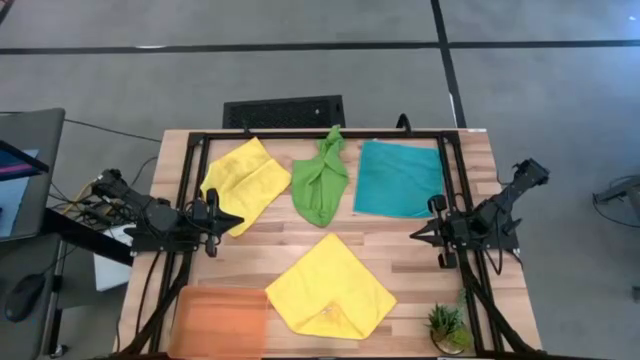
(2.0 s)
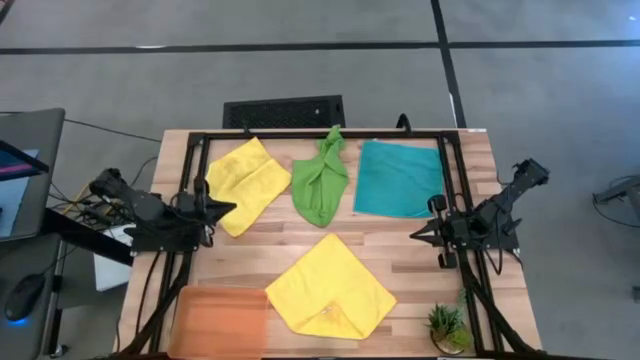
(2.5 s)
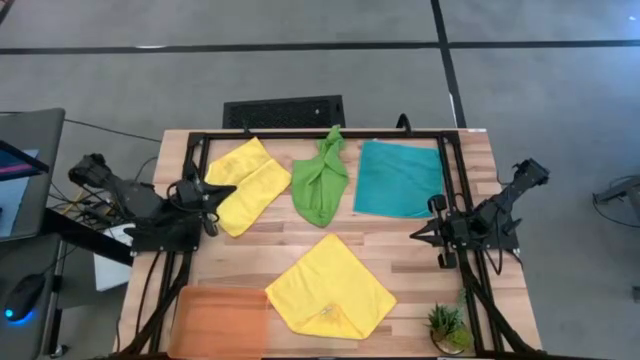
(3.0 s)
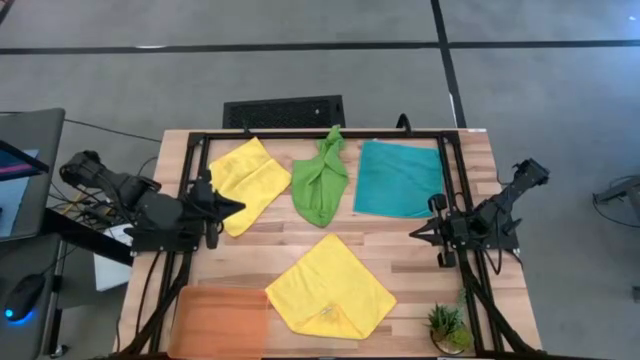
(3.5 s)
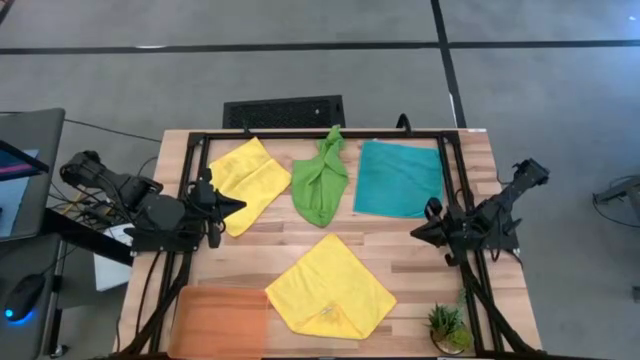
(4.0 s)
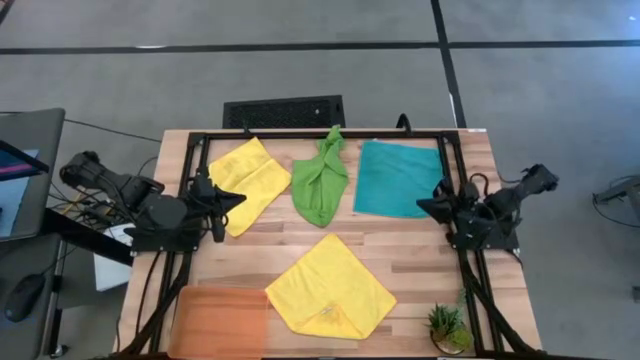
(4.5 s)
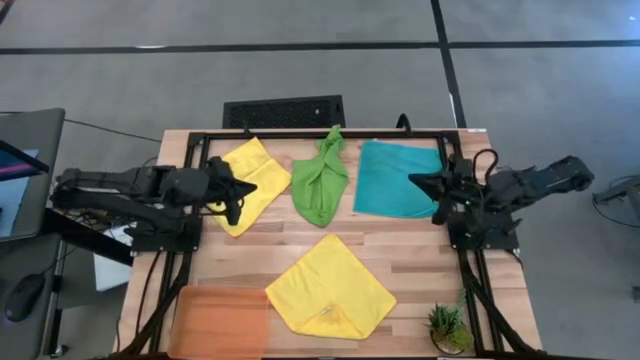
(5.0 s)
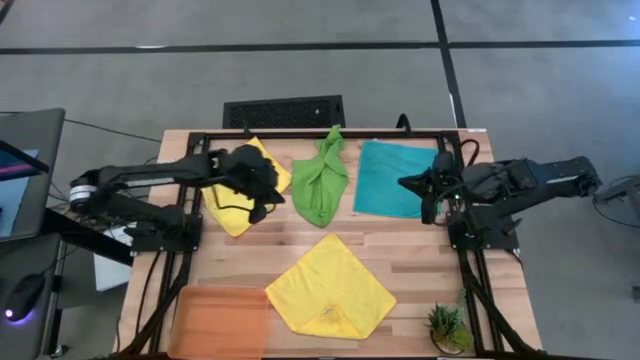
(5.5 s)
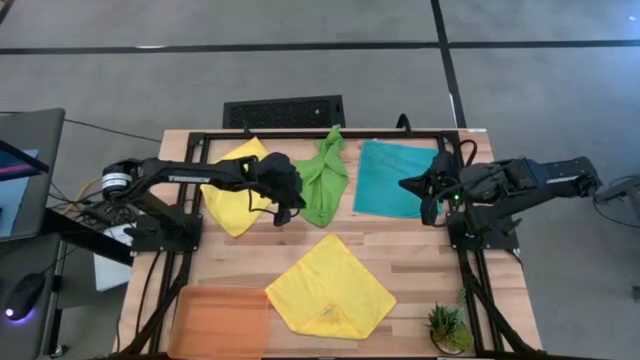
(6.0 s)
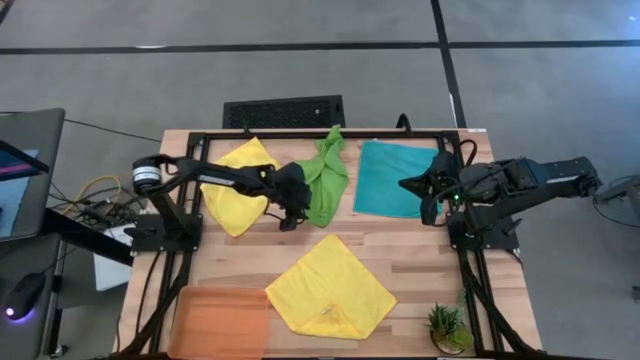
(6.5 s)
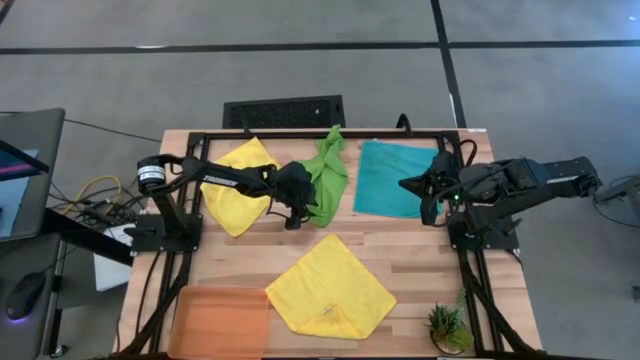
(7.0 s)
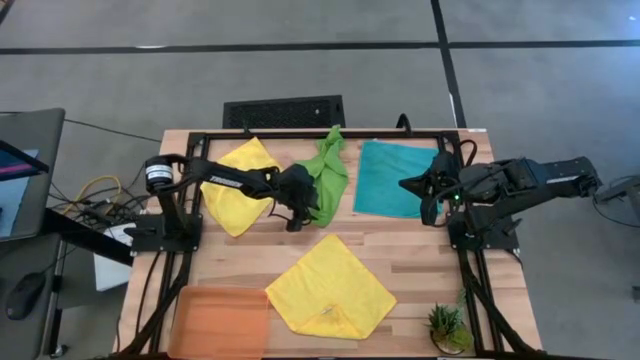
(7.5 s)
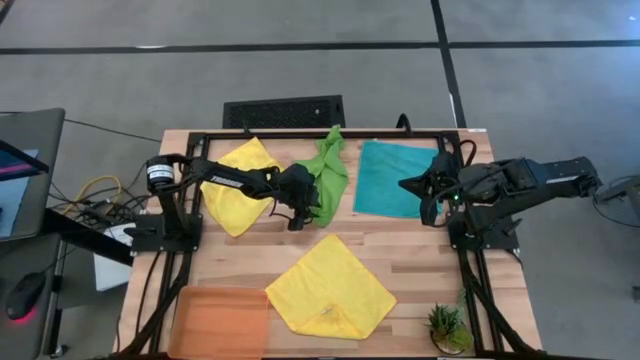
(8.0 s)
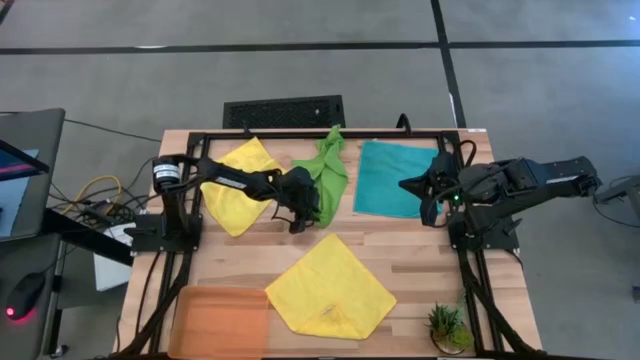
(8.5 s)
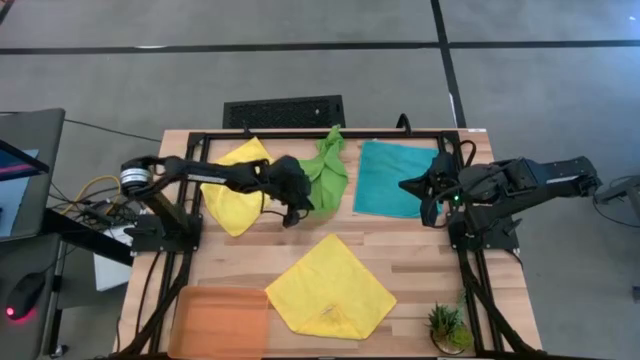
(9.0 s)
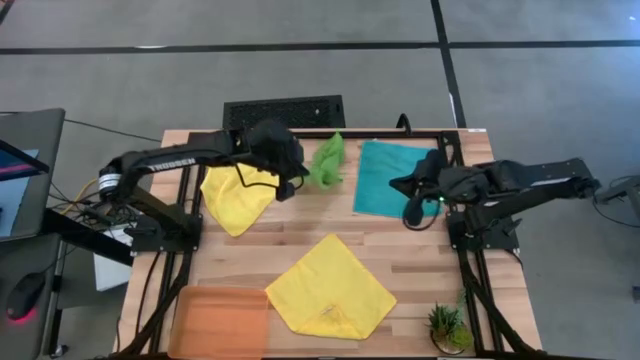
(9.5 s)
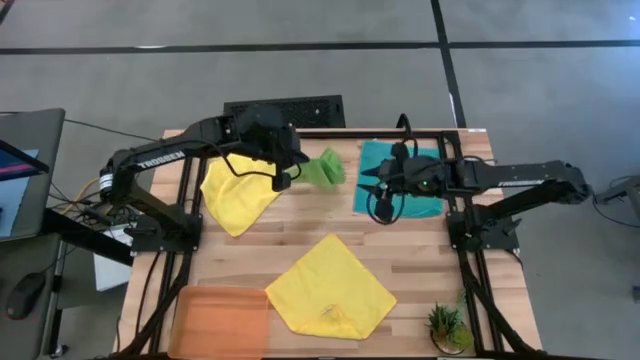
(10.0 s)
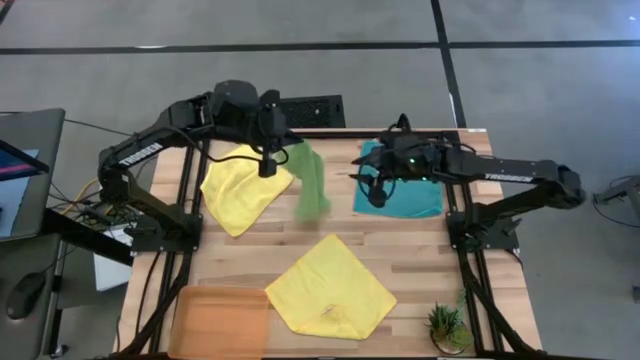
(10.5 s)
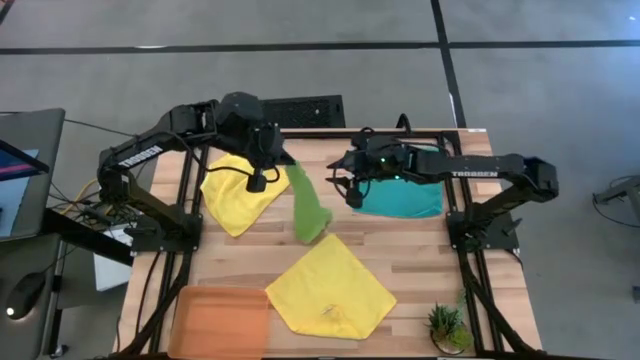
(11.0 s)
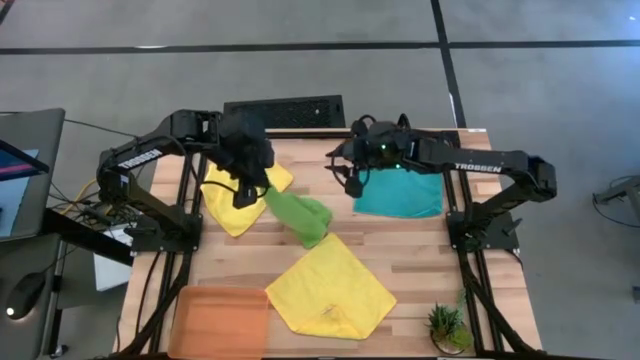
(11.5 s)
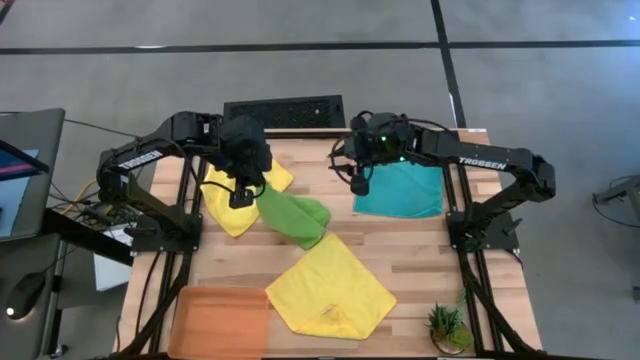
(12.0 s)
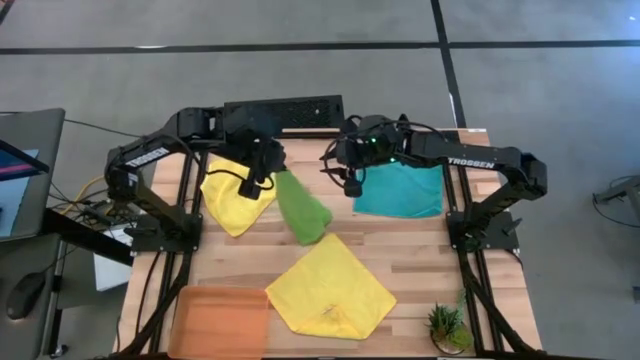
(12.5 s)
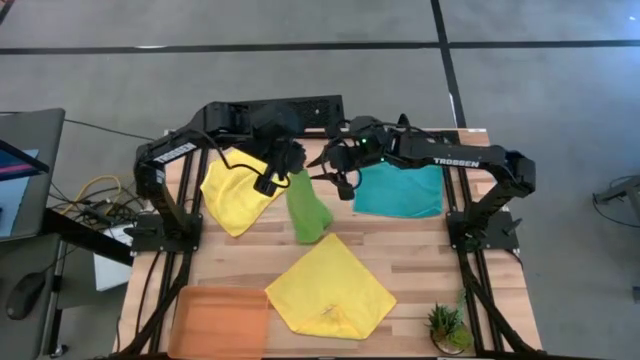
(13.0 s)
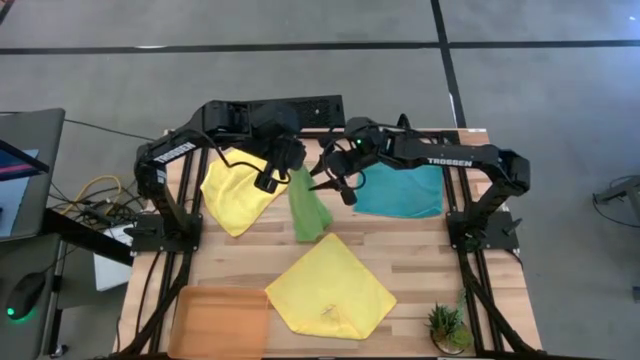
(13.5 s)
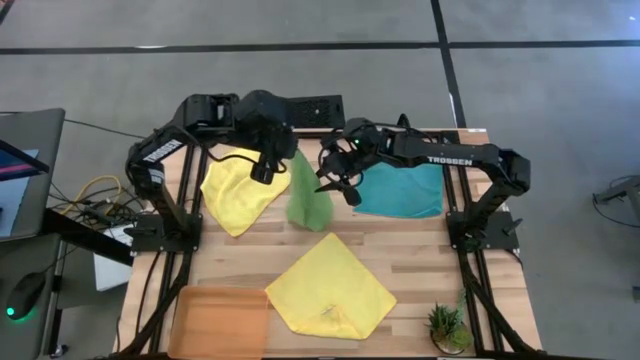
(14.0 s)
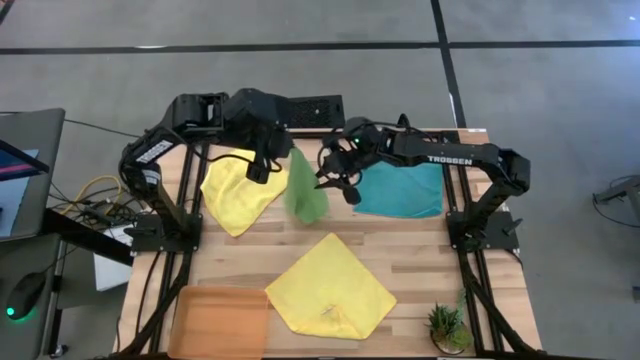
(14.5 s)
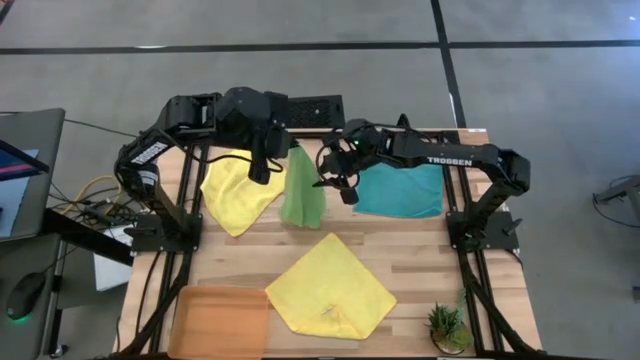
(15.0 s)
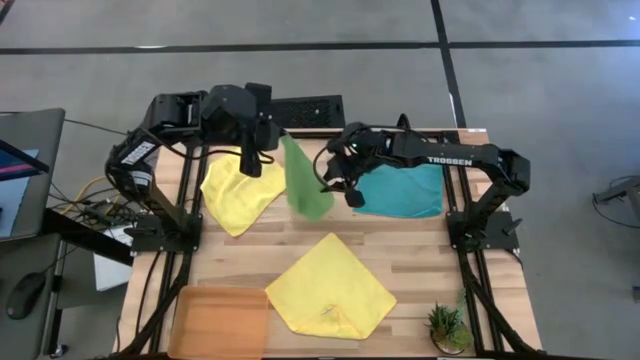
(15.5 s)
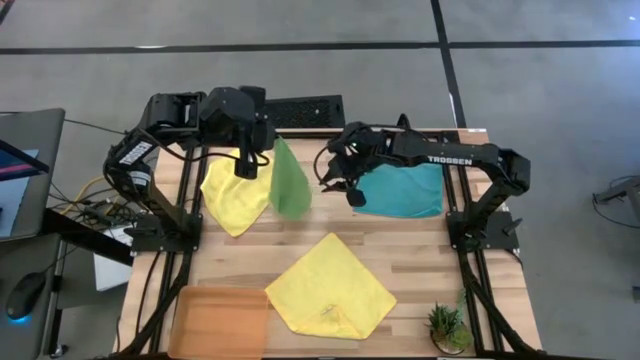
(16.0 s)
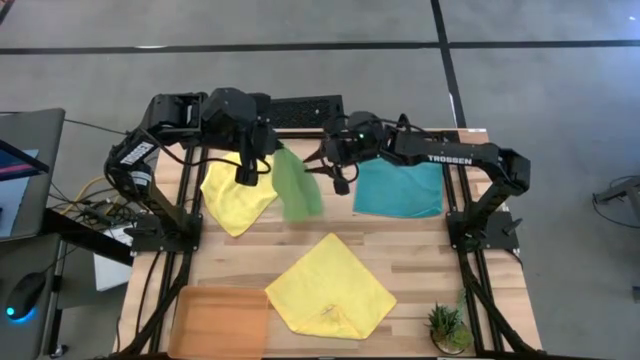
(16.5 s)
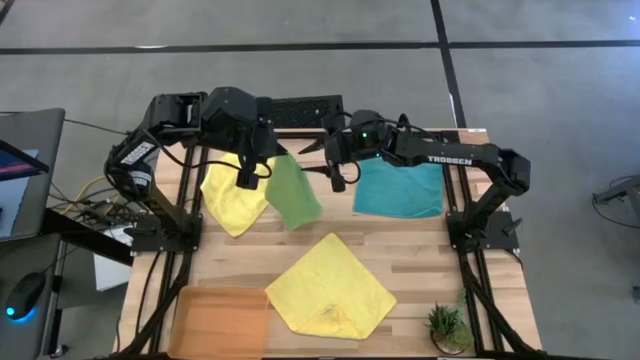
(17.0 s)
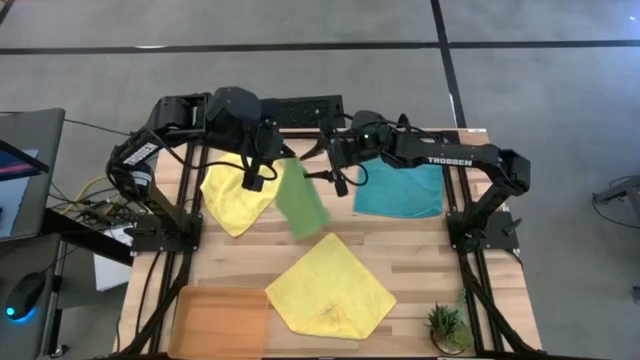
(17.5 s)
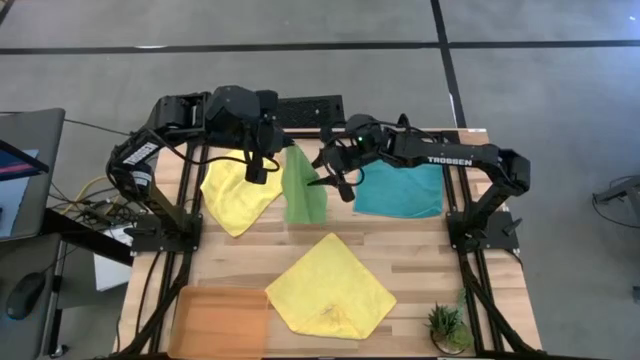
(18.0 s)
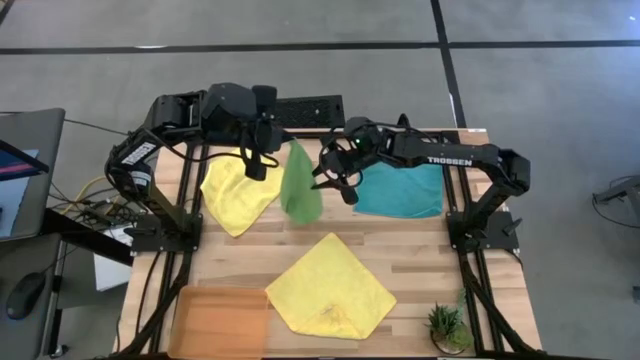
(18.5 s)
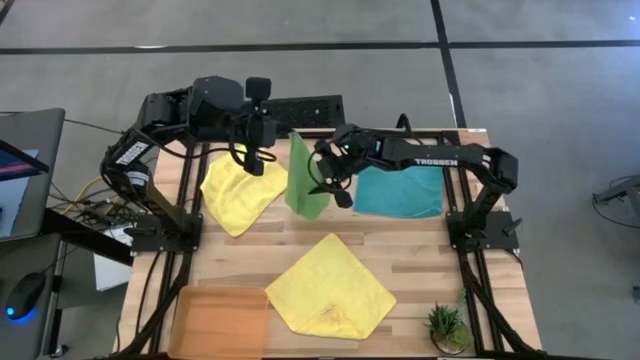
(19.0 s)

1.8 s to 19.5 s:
Task: Fold microfiber towels
Fold the green microfiber towel
